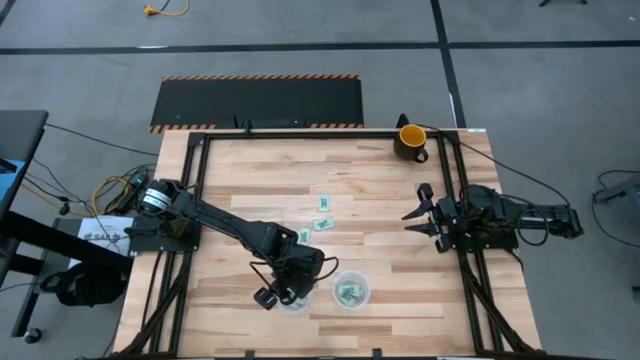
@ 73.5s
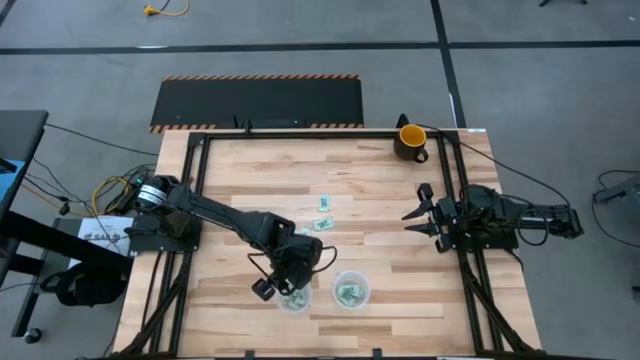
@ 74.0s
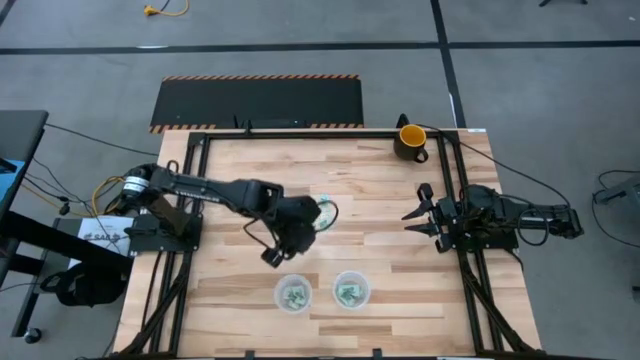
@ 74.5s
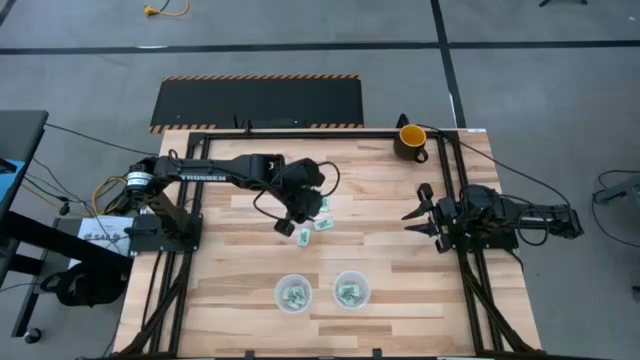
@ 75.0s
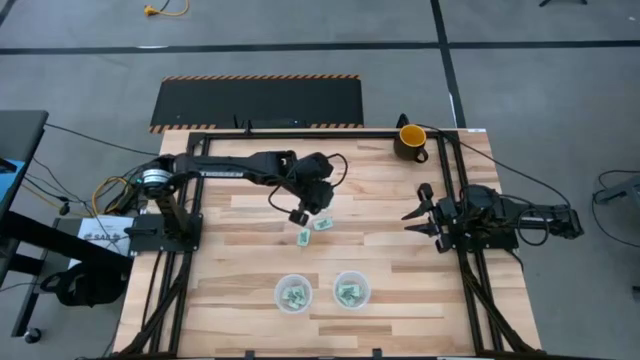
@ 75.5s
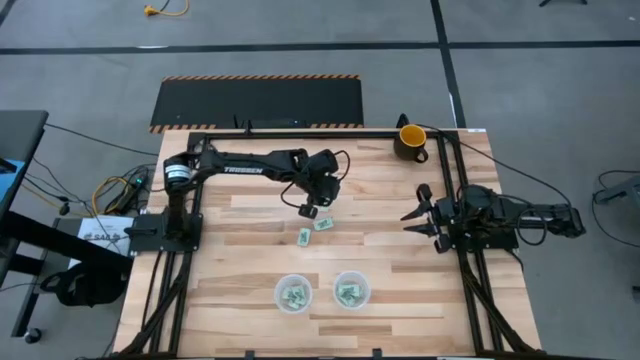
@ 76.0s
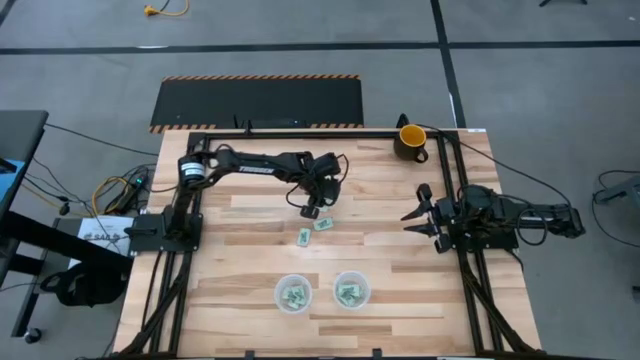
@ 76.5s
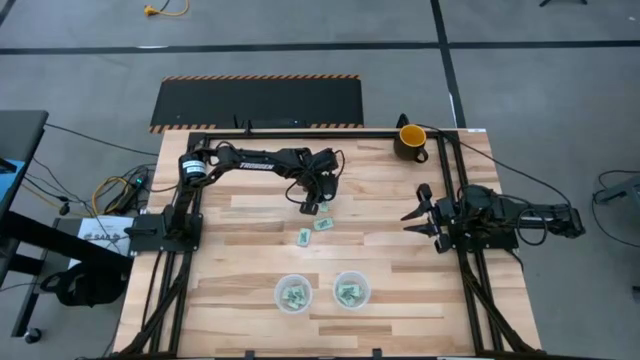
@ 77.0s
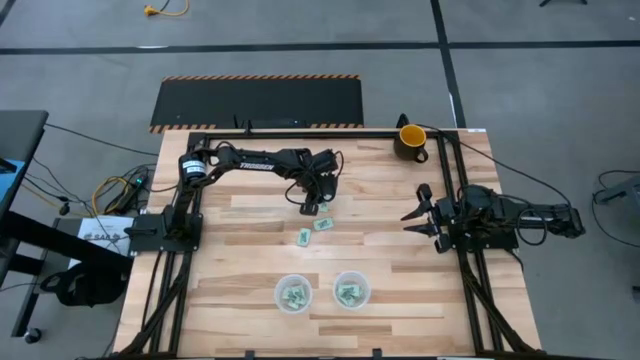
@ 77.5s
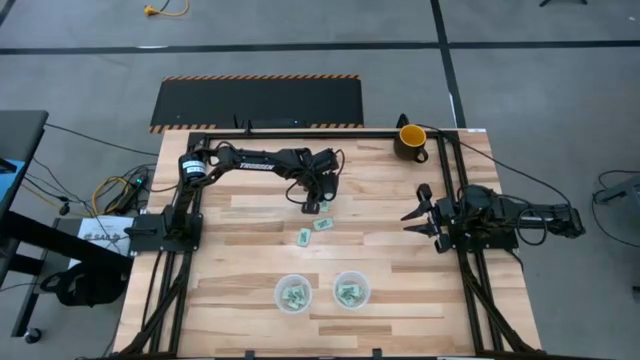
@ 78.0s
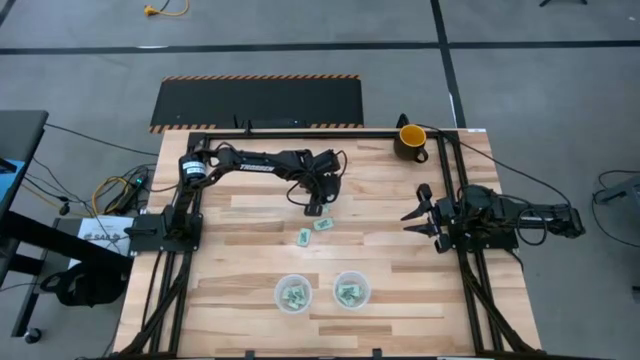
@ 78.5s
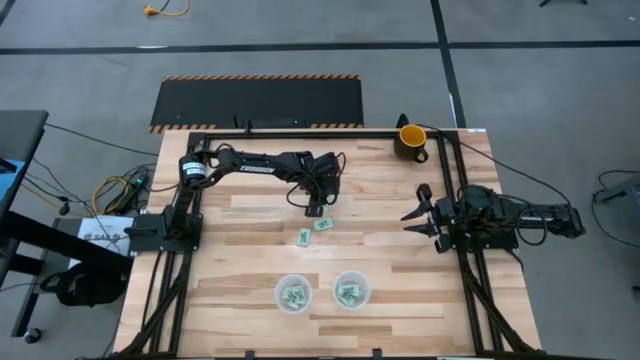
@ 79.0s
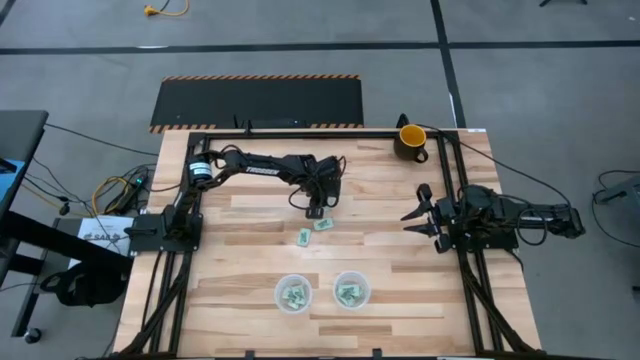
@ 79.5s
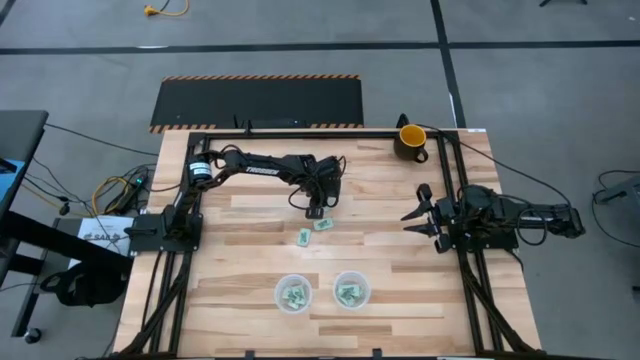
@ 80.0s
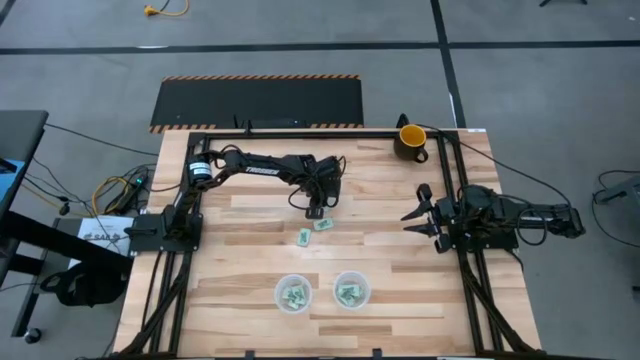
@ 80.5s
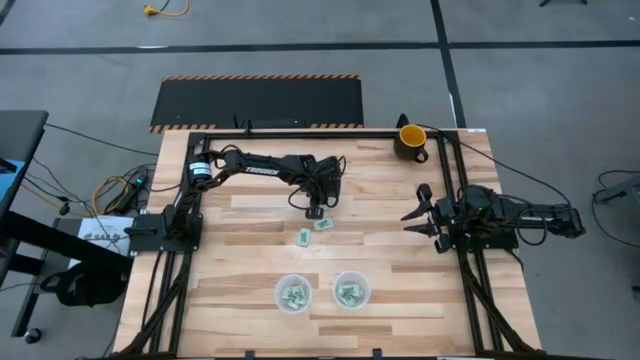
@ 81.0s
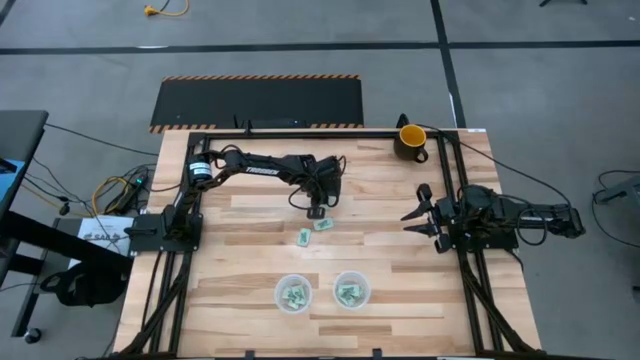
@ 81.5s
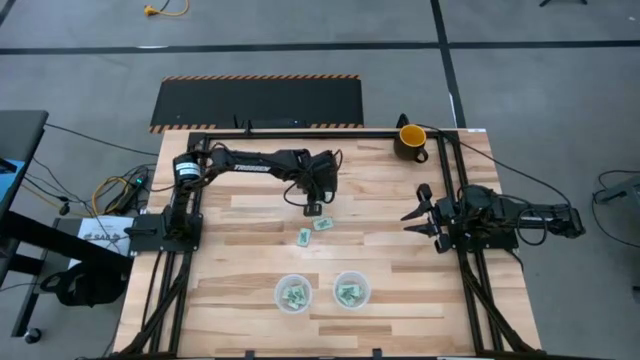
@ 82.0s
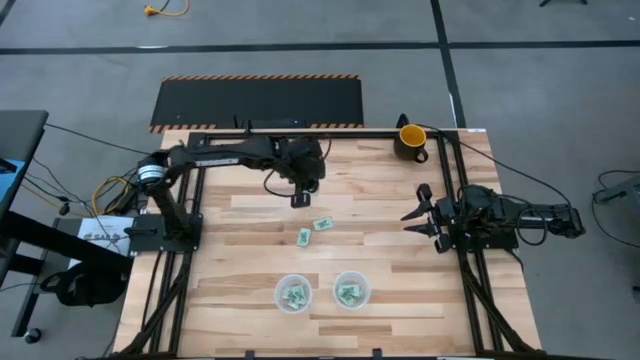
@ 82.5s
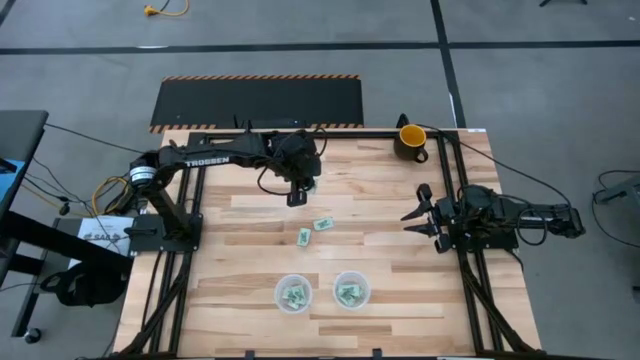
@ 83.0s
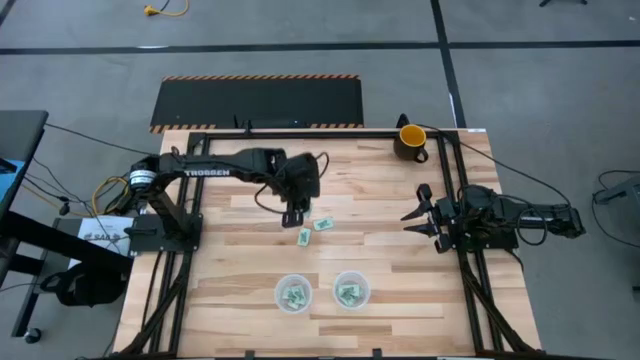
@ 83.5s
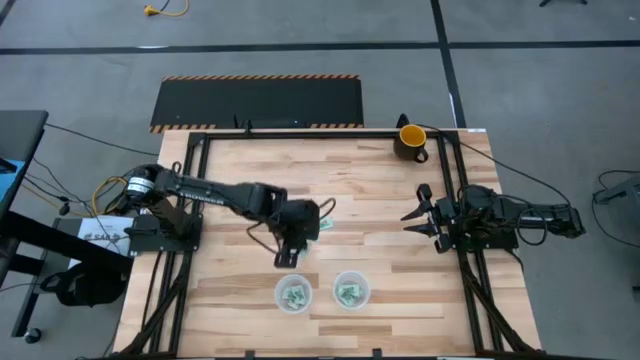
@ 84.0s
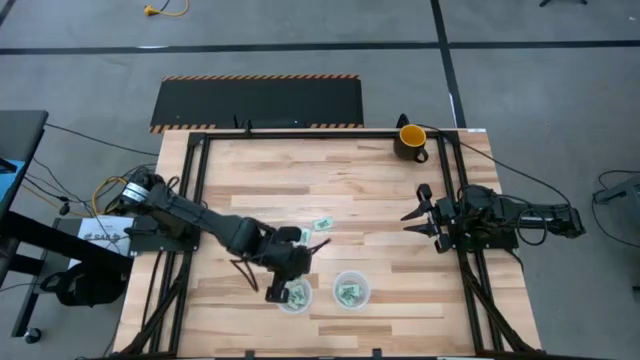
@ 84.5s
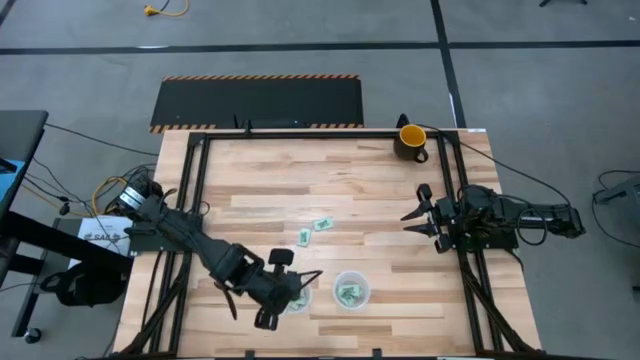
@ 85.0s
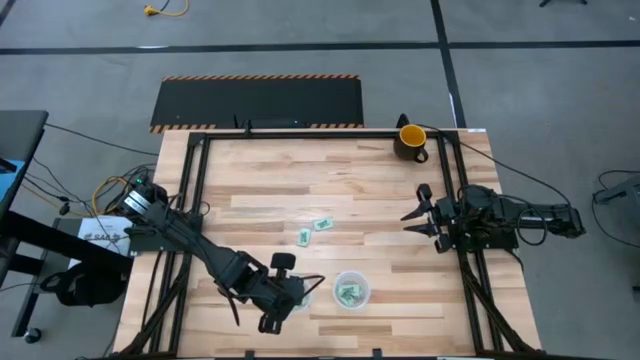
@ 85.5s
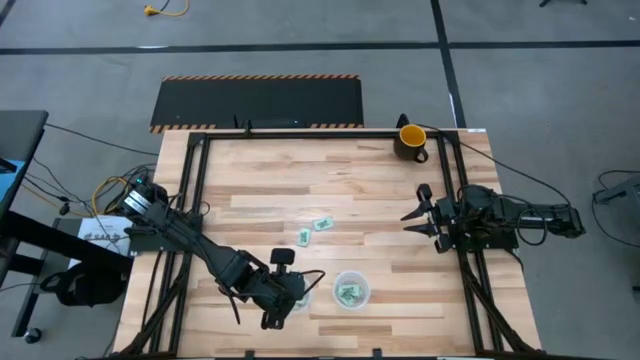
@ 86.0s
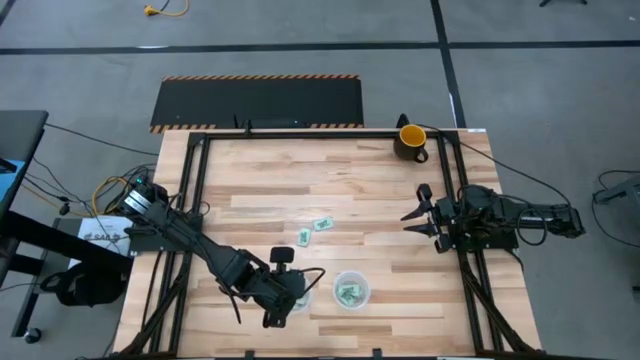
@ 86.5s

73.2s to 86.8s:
Task: Pick and place Stevia / Truvia into bins
Put the white stevia pack into the left transparent basket

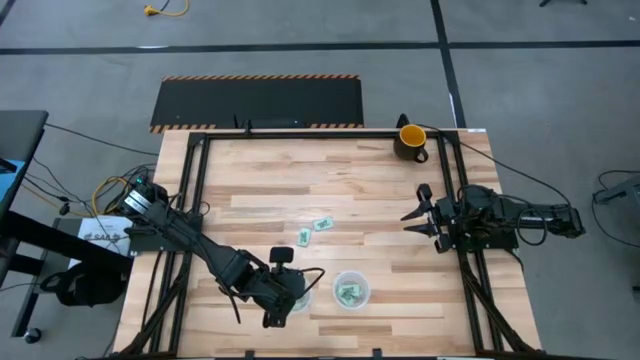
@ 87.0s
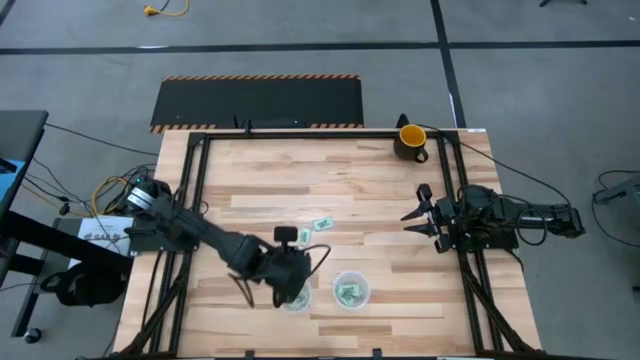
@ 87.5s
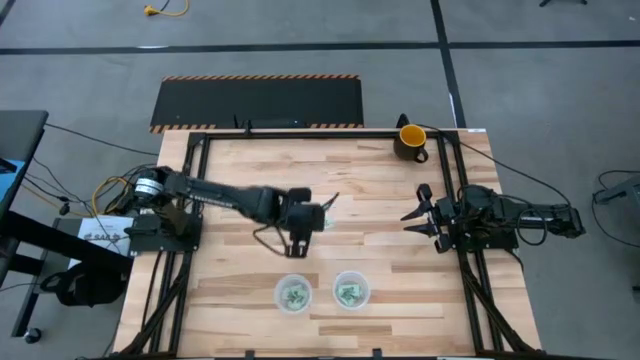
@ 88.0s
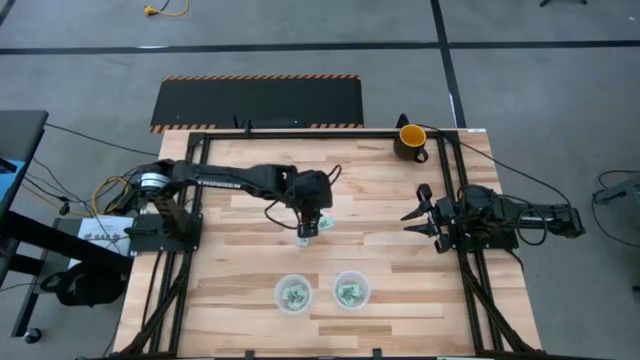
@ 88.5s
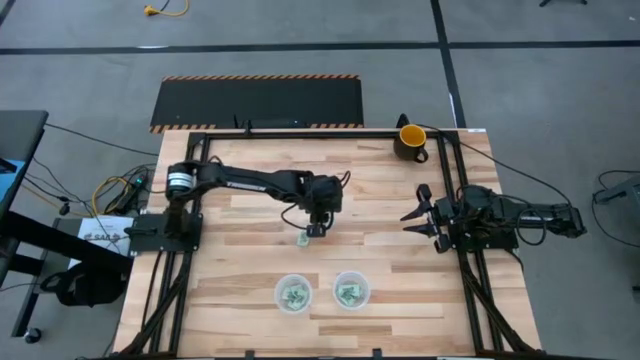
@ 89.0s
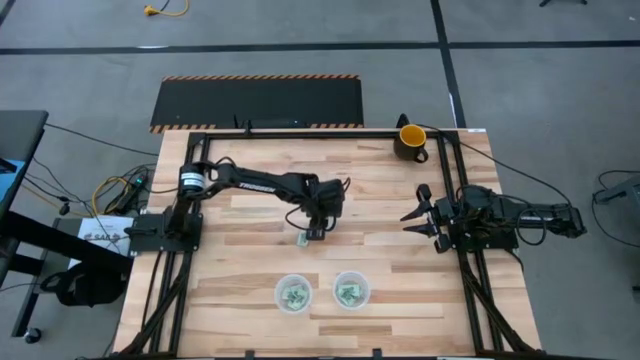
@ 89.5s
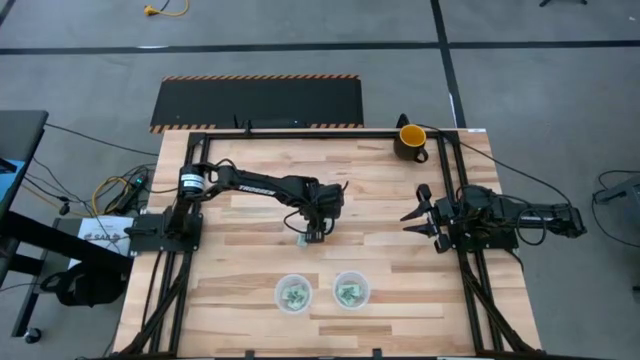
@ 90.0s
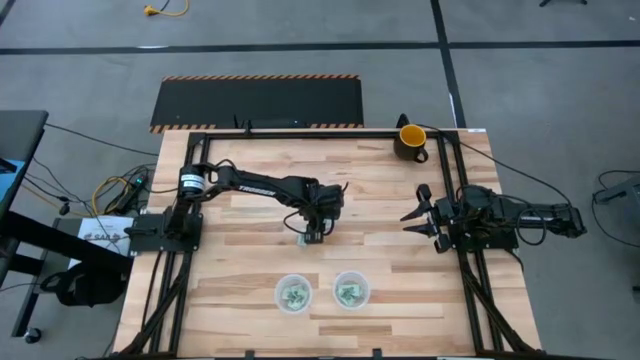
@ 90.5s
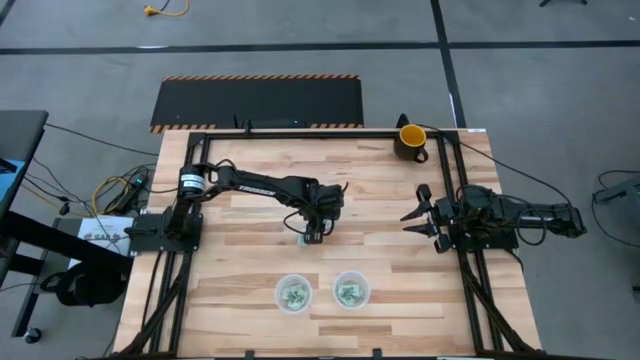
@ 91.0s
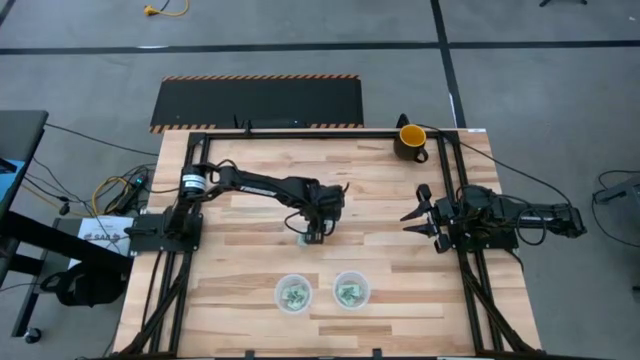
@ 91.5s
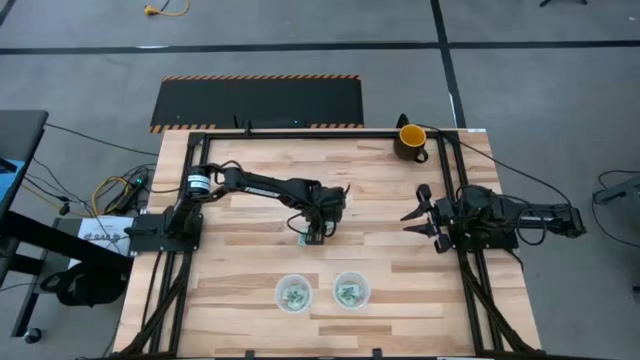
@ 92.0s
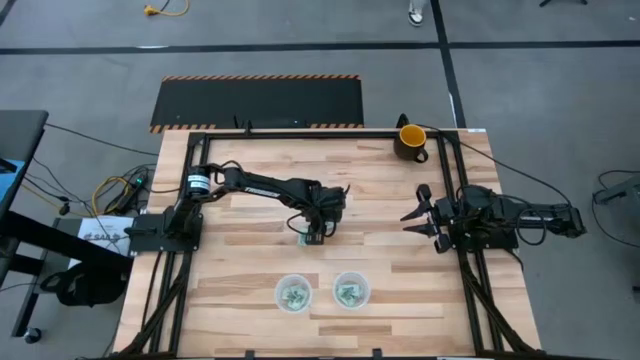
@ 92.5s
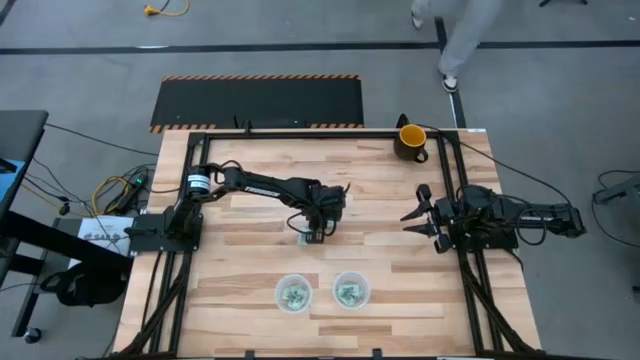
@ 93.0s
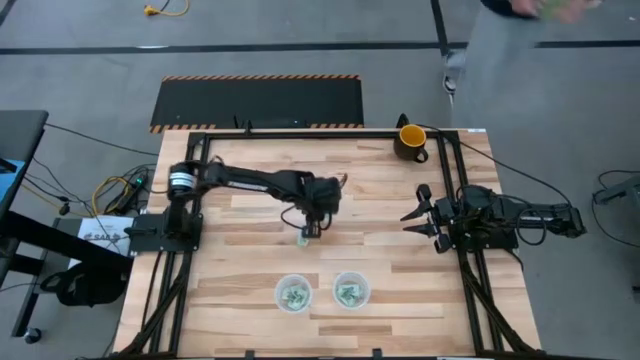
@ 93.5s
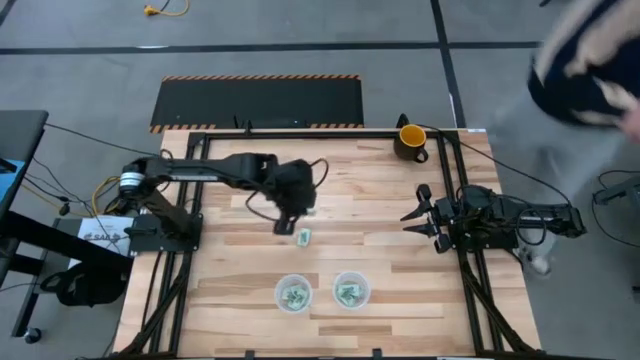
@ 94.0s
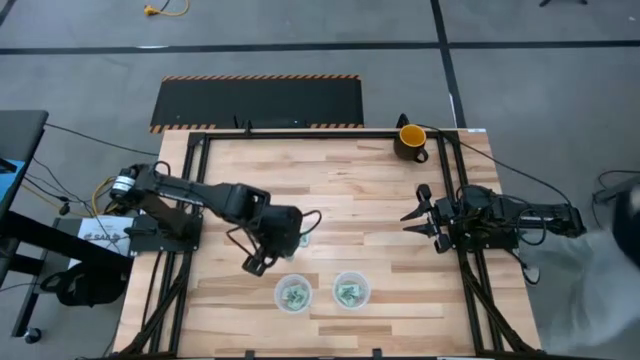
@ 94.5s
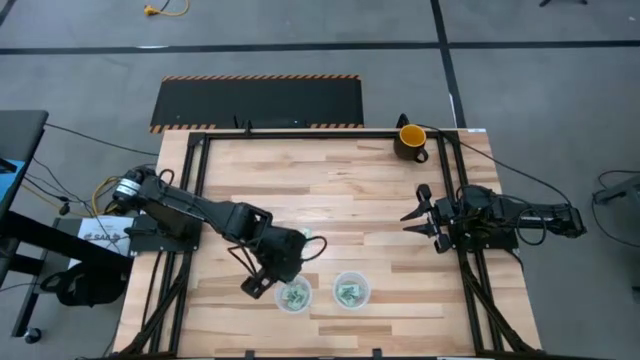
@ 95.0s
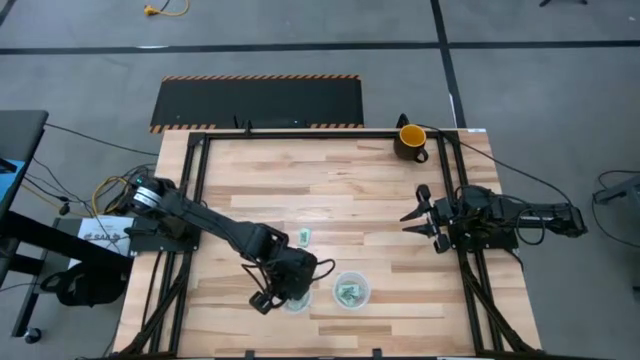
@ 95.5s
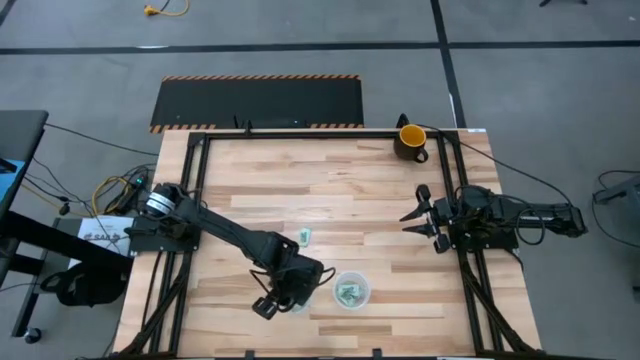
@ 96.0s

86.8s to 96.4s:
Put the white stevia pack into the left transparent basket
